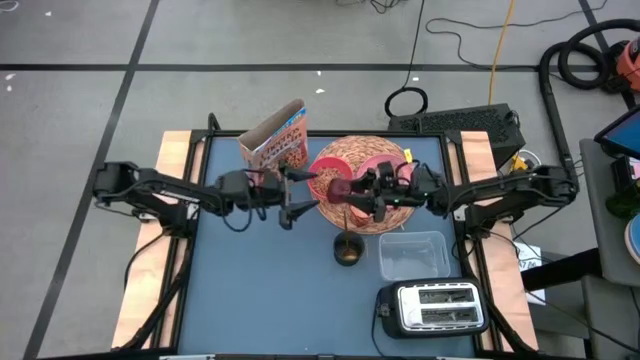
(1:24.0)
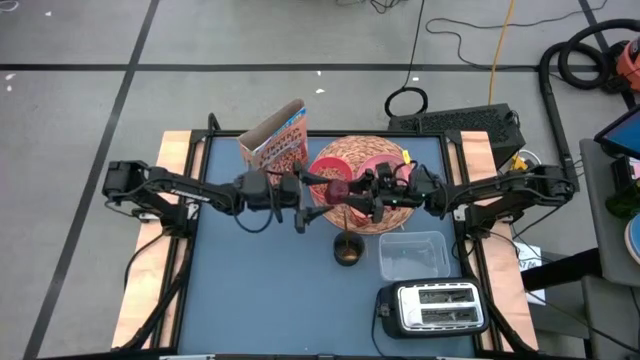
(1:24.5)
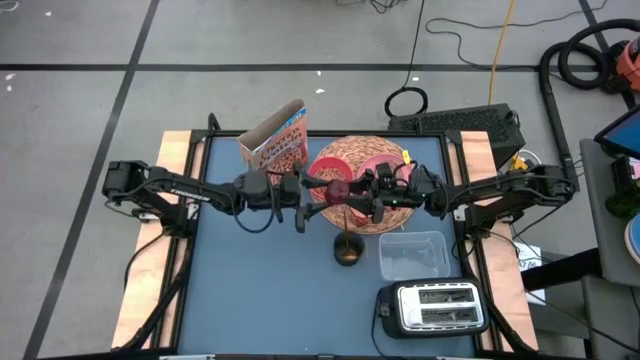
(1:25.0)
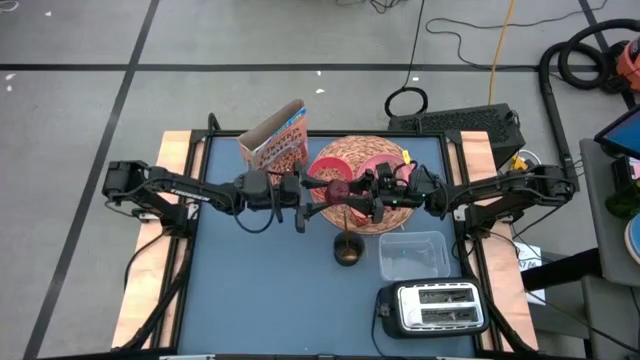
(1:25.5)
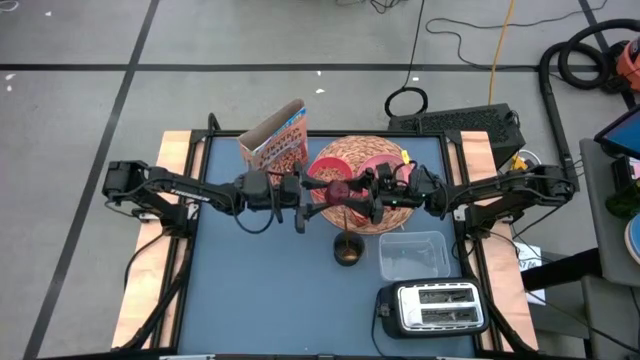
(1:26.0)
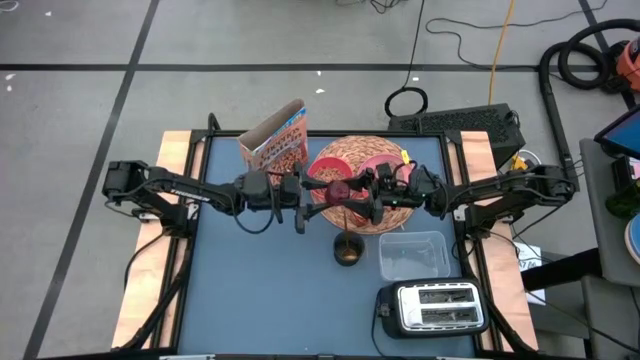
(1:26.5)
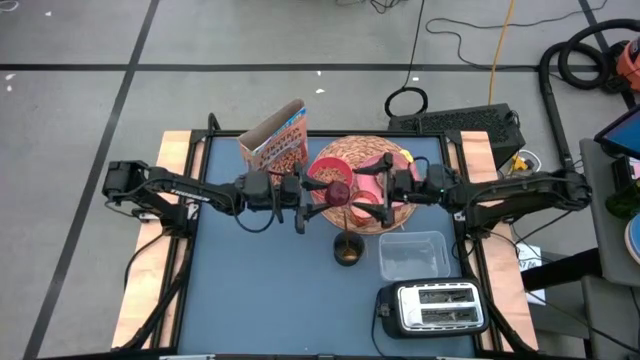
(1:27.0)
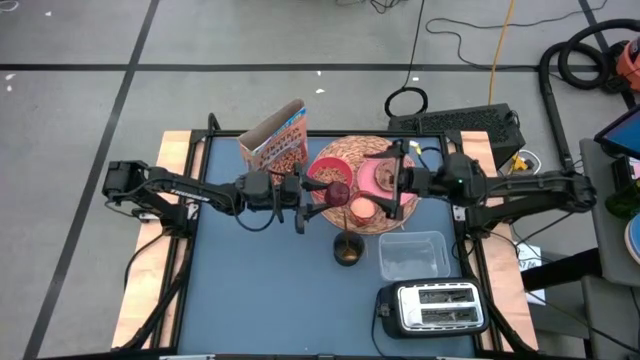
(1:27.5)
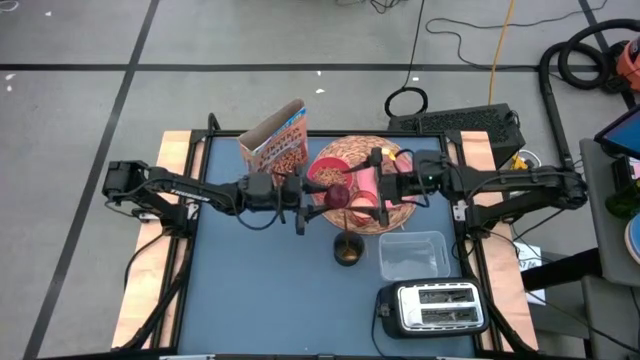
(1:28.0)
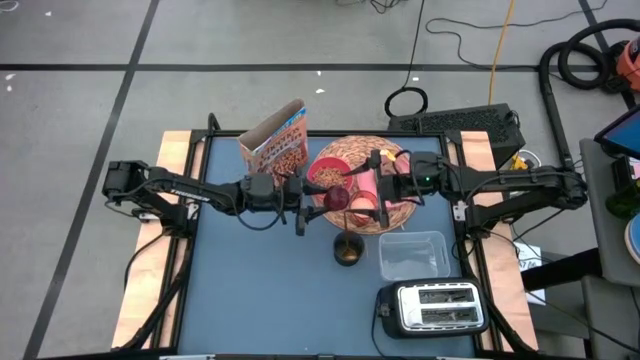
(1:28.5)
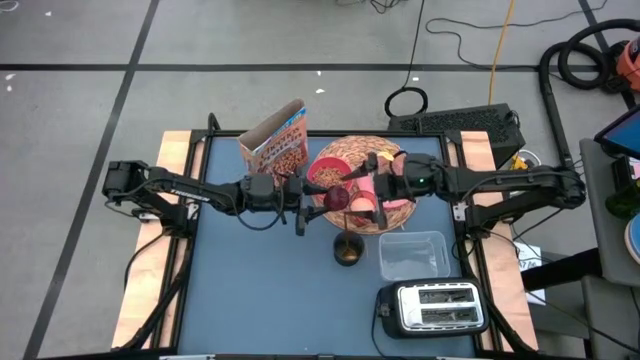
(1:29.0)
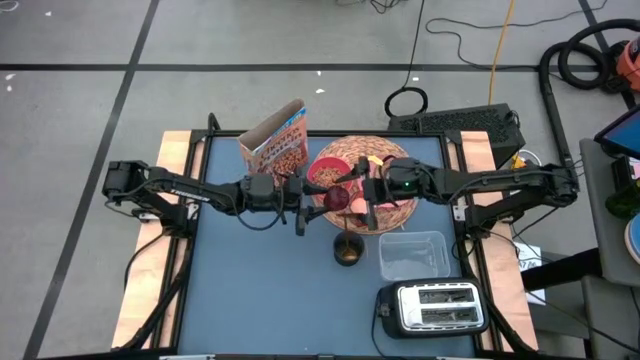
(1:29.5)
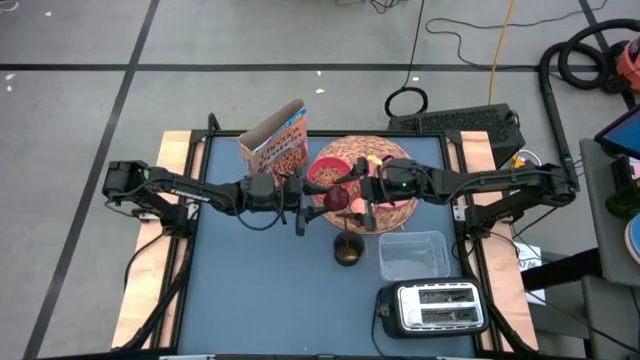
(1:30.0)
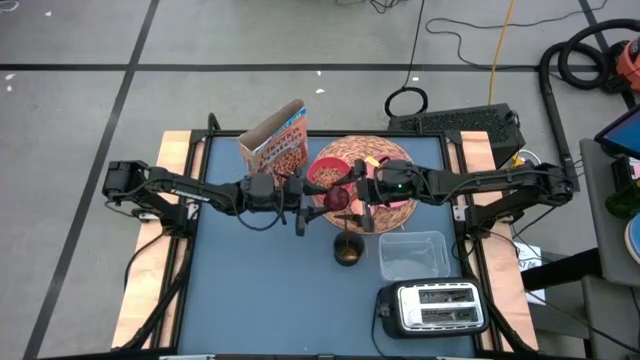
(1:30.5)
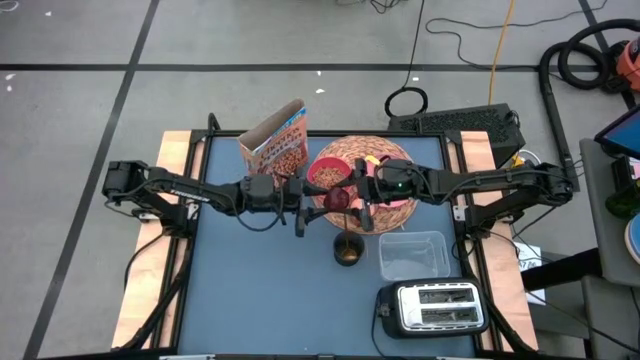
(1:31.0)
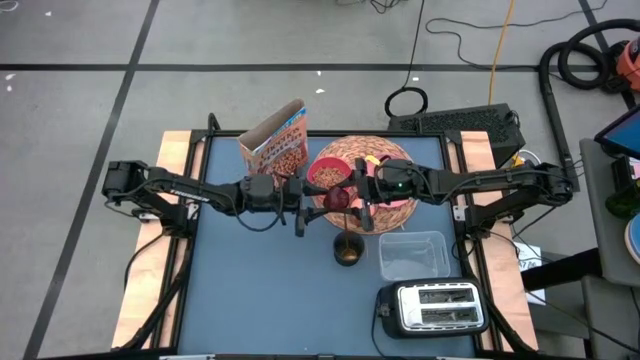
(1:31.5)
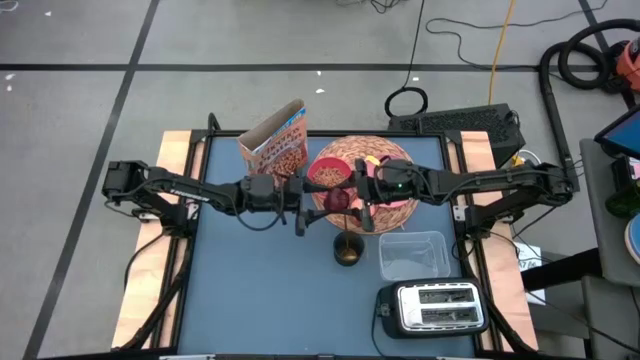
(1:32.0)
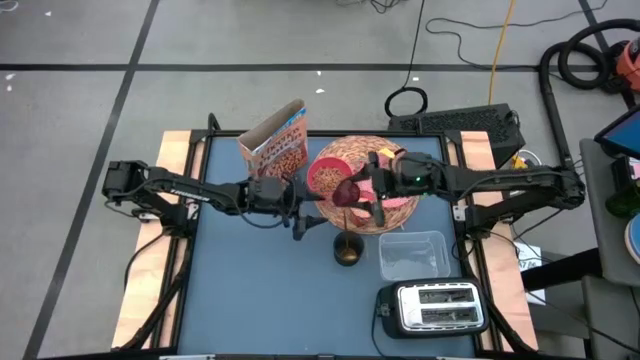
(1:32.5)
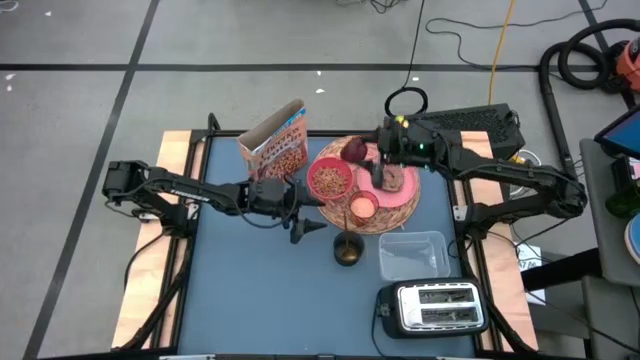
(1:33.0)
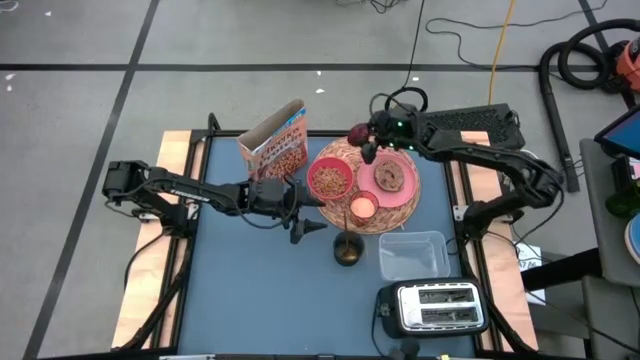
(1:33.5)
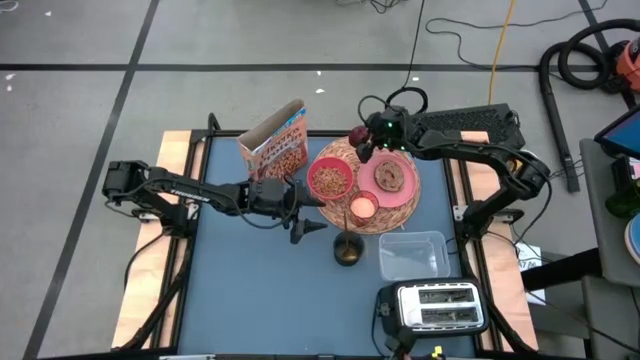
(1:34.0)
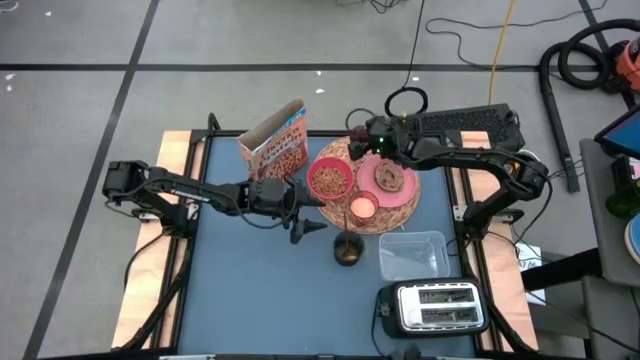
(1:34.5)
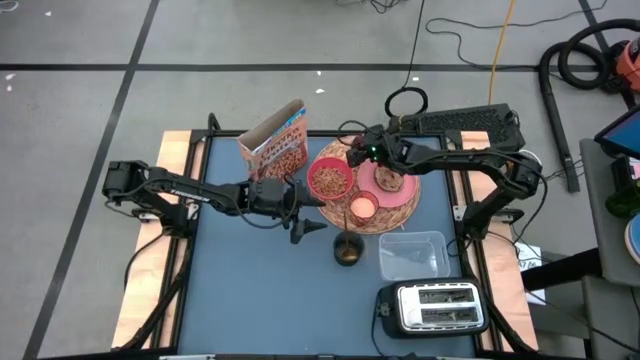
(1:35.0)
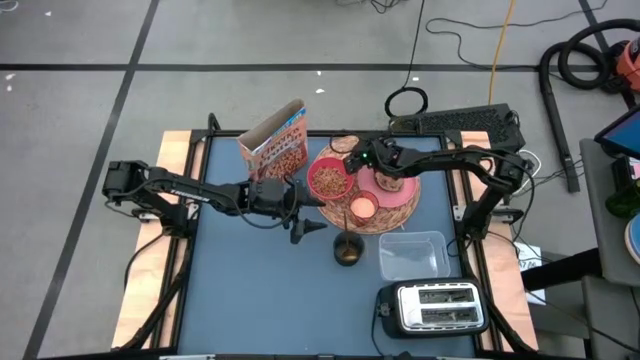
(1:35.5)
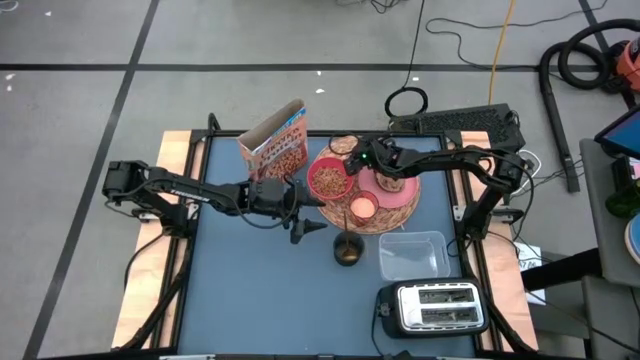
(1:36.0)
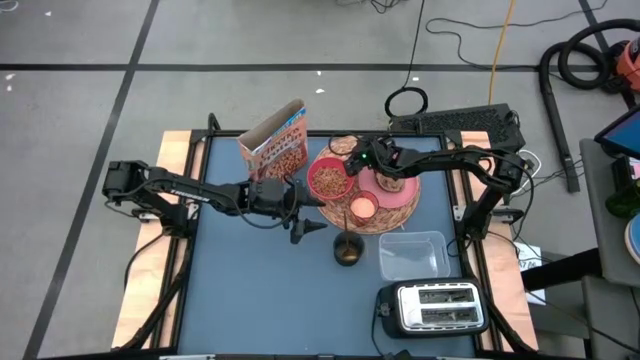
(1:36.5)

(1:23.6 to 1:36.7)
Task: Arrange a breakfast setting
Put the red apple on the top center of the brown woven mat

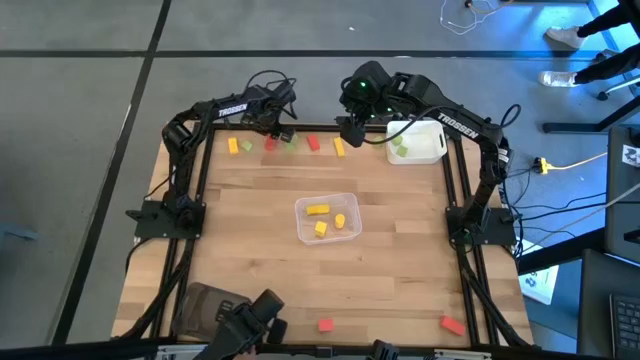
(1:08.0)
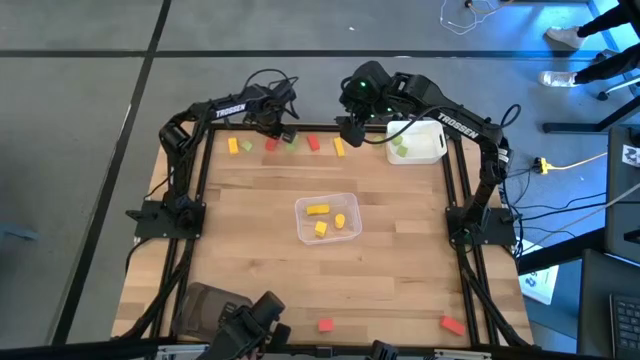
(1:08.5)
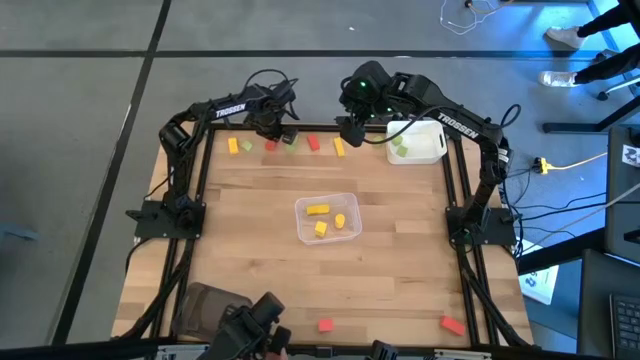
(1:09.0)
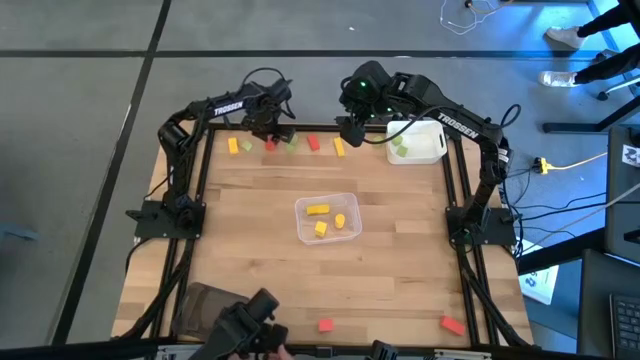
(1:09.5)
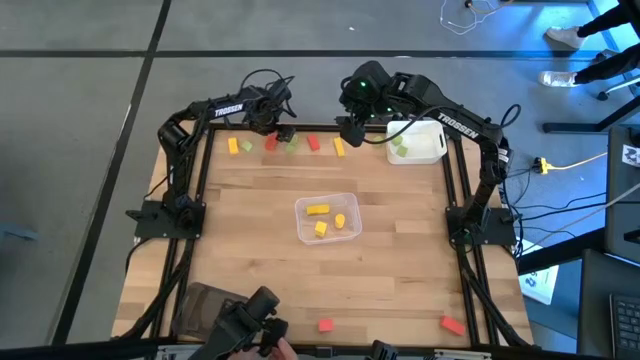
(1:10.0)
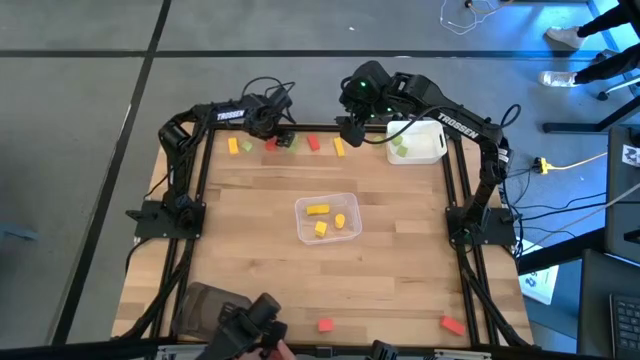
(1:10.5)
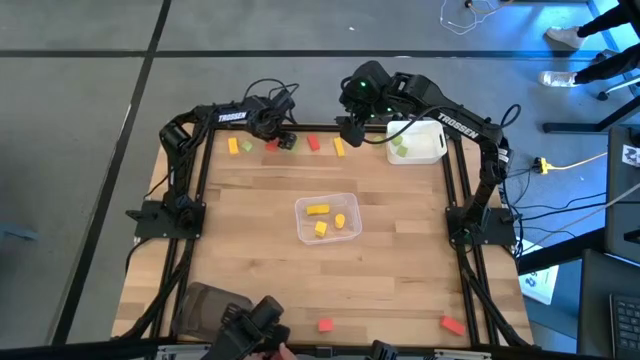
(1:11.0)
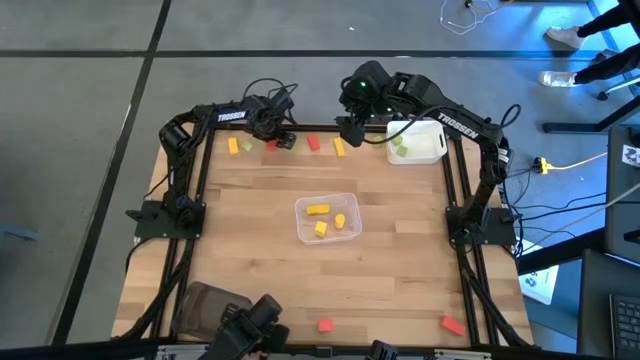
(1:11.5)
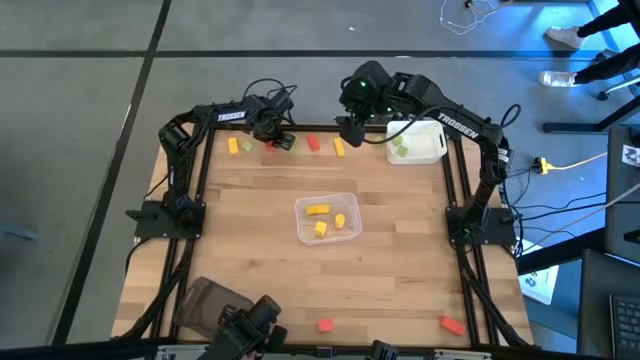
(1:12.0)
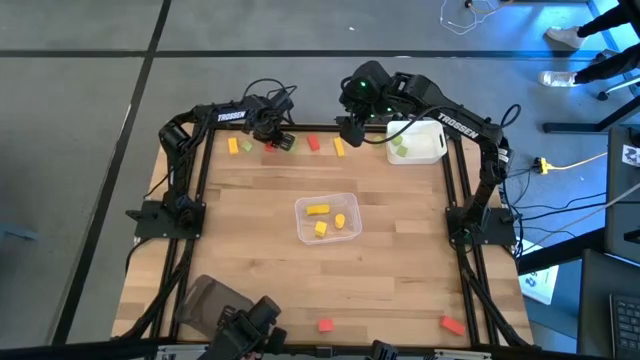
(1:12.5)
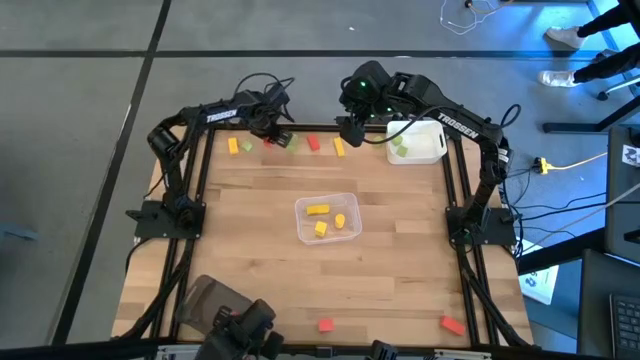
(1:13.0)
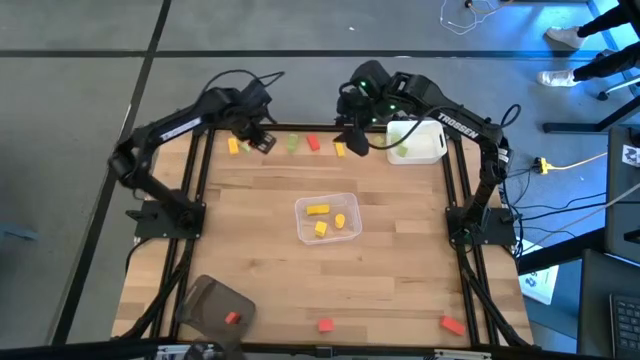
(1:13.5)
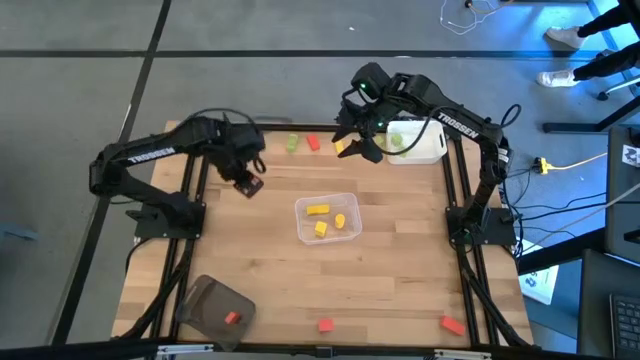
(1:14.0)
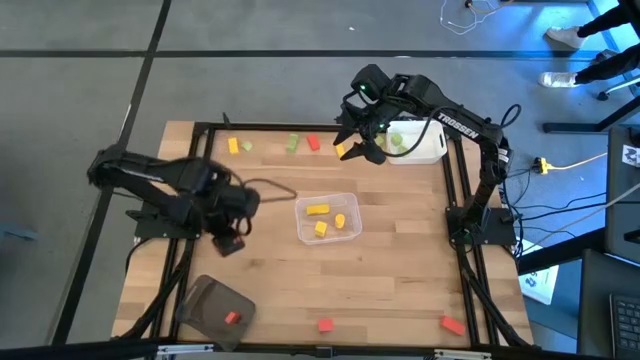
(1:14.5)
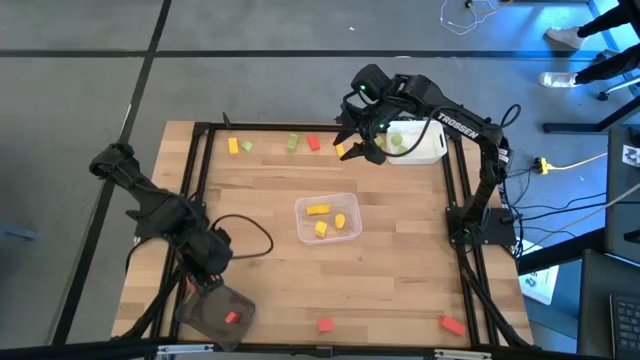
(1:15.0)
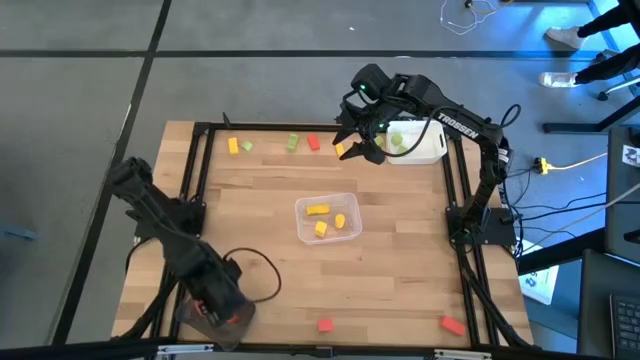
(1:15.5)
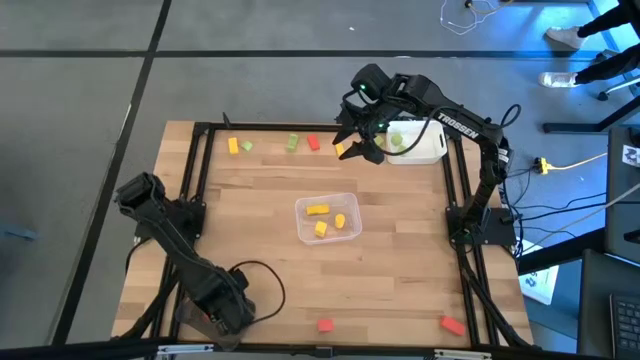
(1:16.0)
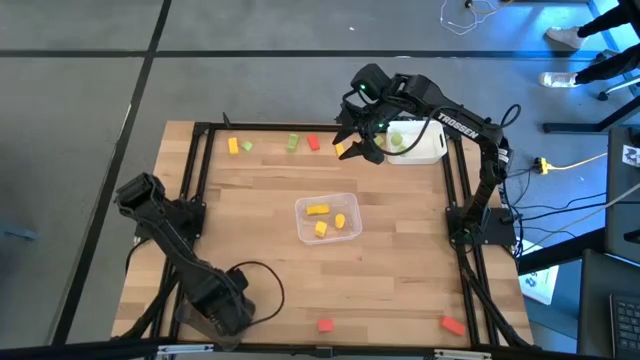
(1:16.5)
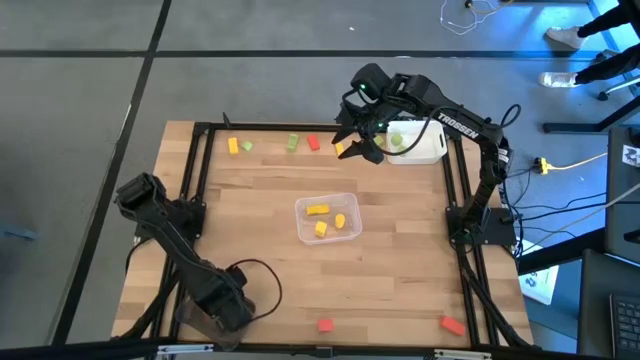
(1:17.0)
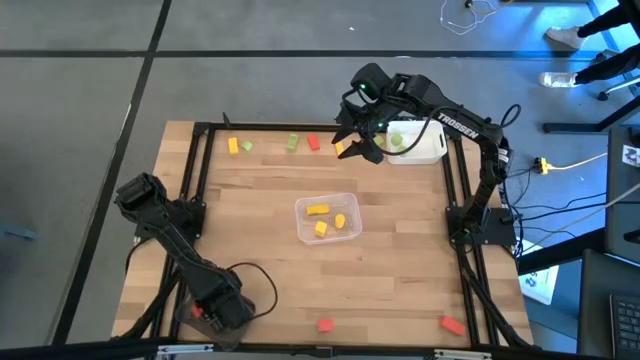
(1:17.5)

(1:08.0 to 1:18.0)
Task: Sort & place blocks by color
Put the orange block into the black bin
